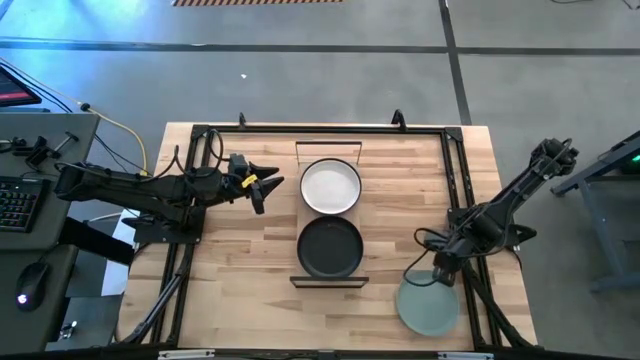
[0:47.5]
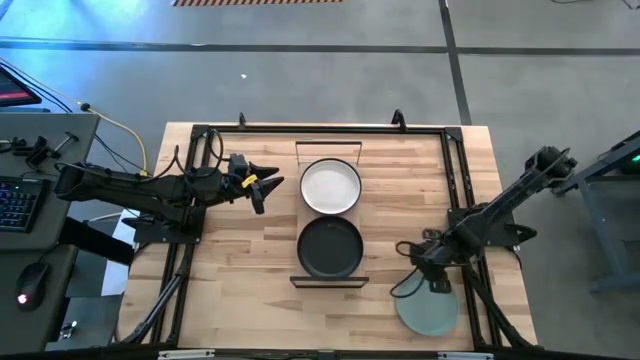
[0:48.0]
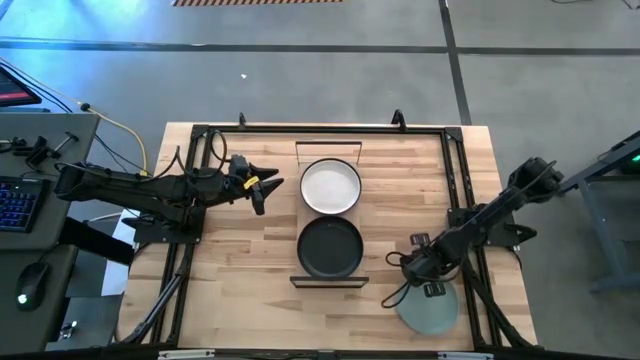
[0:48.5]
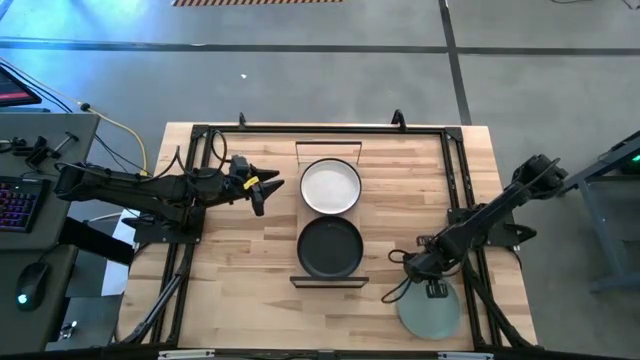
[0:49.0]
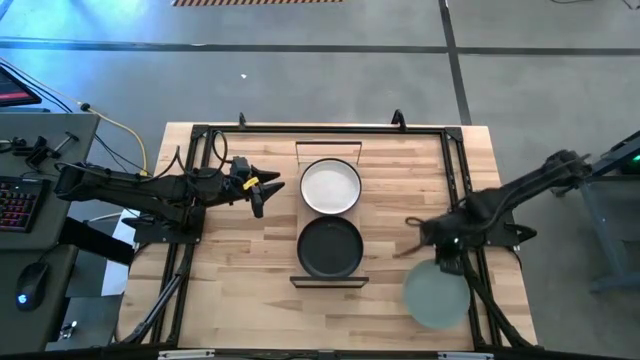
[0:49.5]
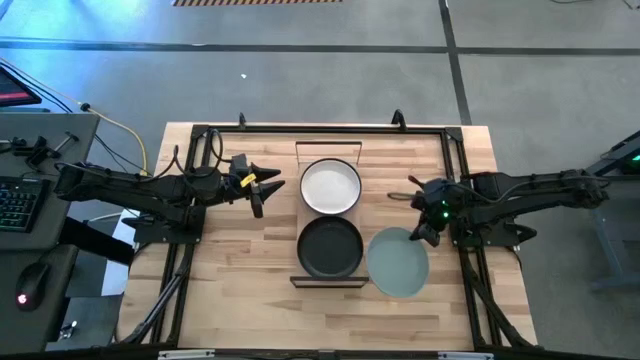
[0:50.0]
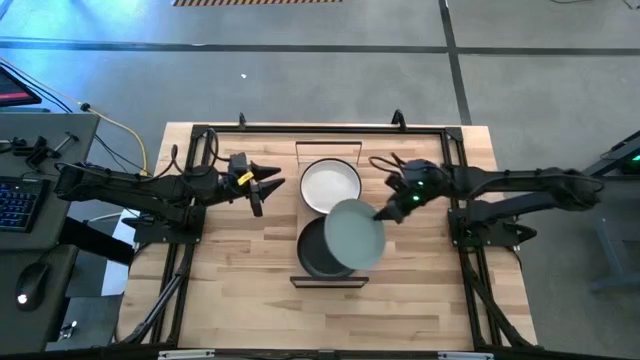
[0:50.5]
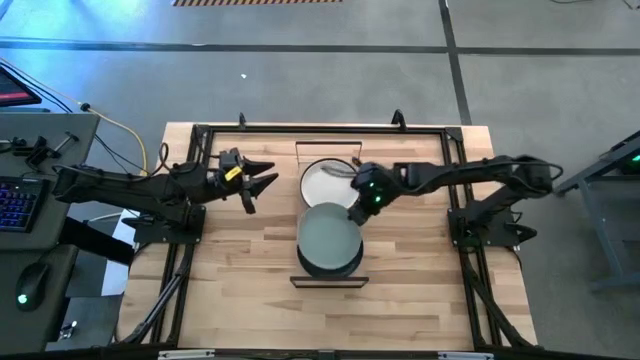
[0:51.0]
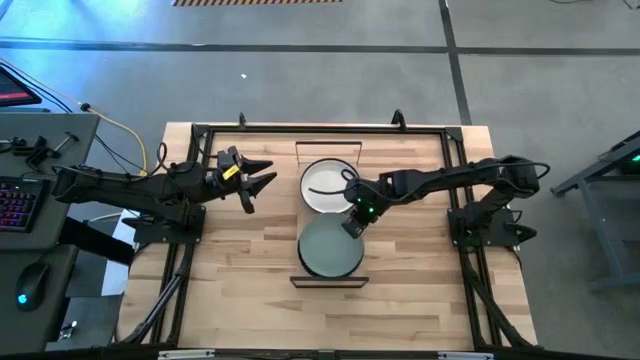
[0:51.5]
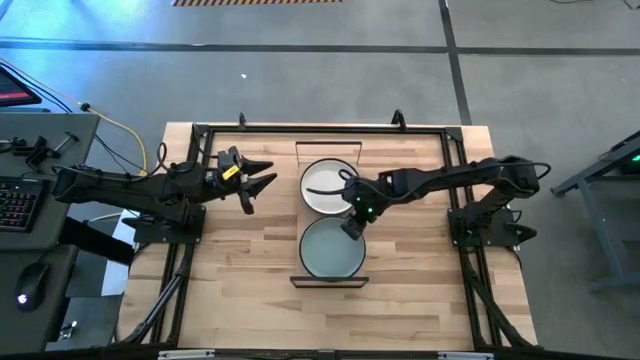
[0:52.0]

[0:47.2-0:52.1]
Task: Place and stack plates onto a shelf
Stack the light blue plate on top of the black plate on the shelf

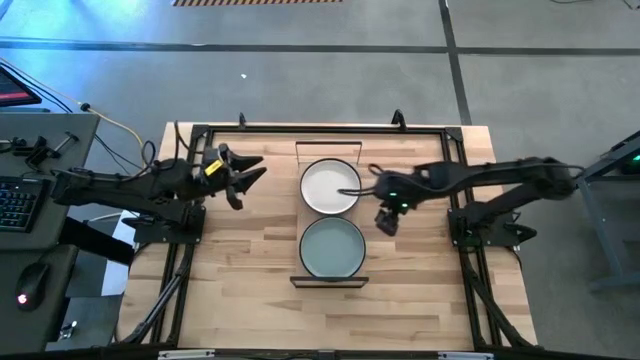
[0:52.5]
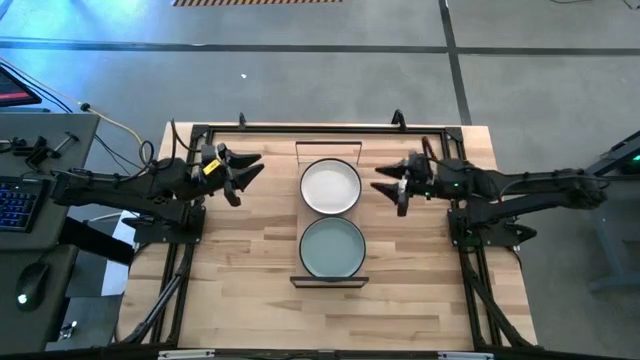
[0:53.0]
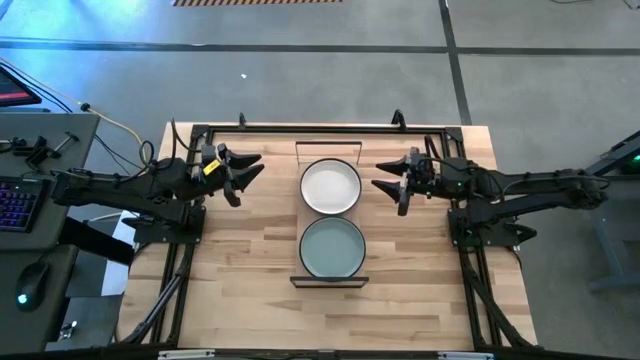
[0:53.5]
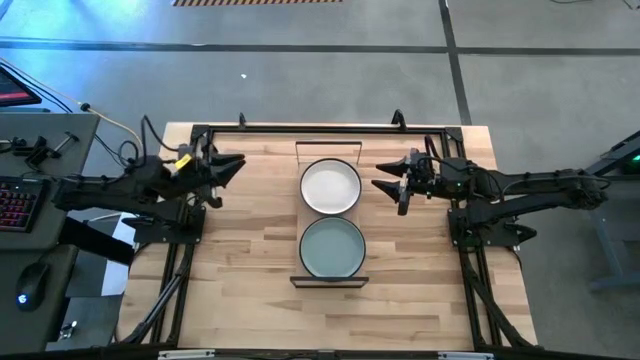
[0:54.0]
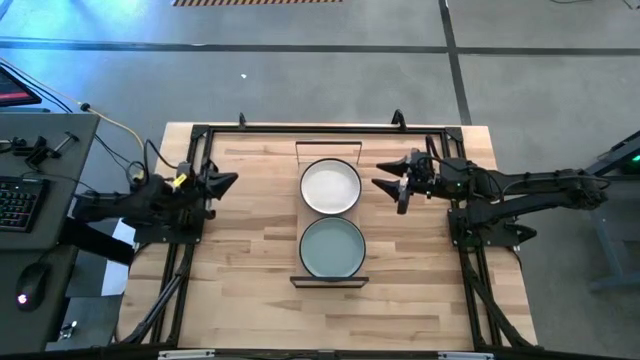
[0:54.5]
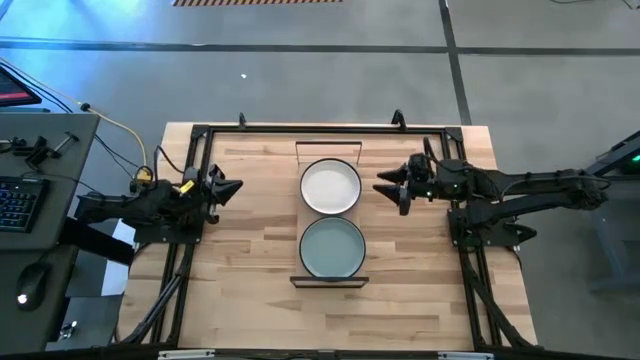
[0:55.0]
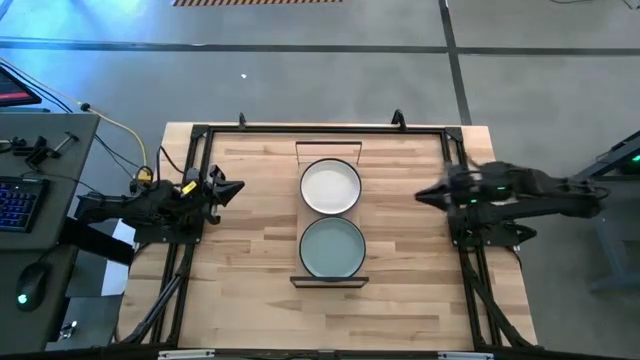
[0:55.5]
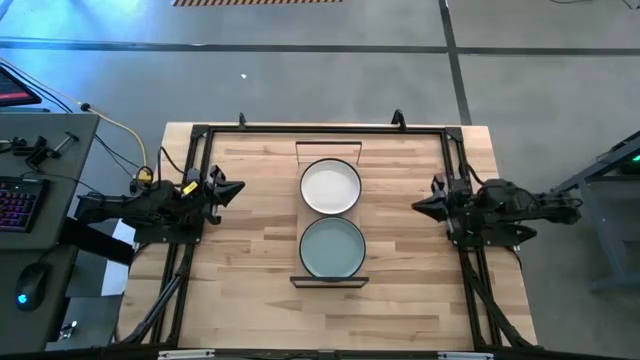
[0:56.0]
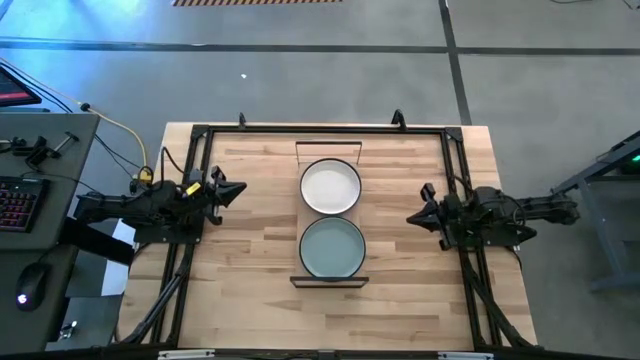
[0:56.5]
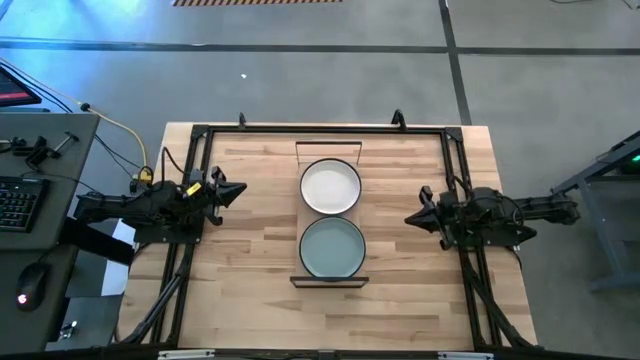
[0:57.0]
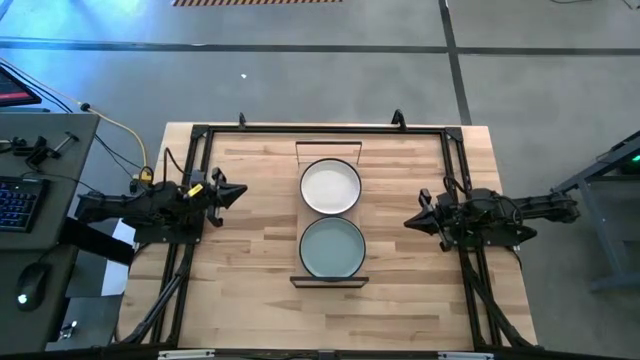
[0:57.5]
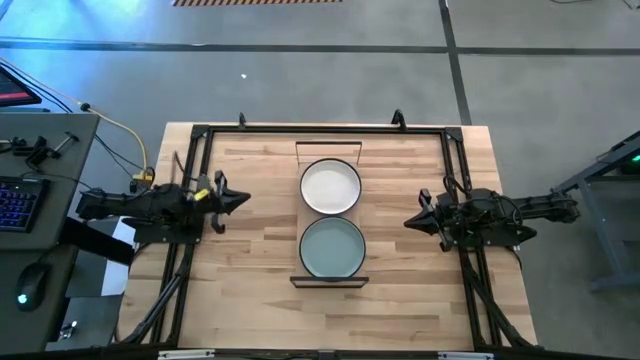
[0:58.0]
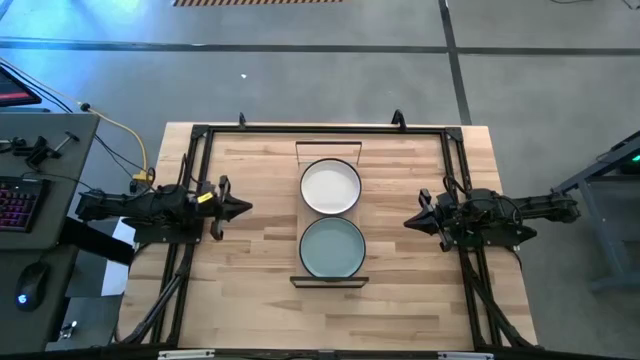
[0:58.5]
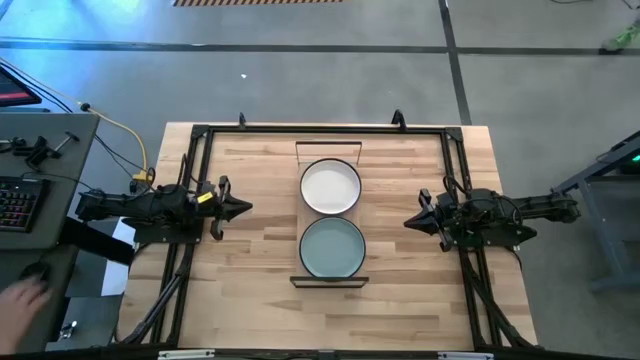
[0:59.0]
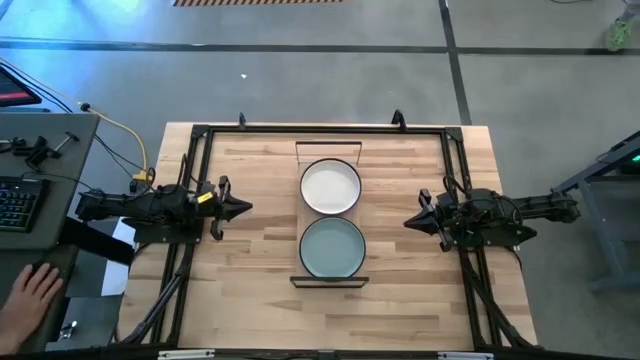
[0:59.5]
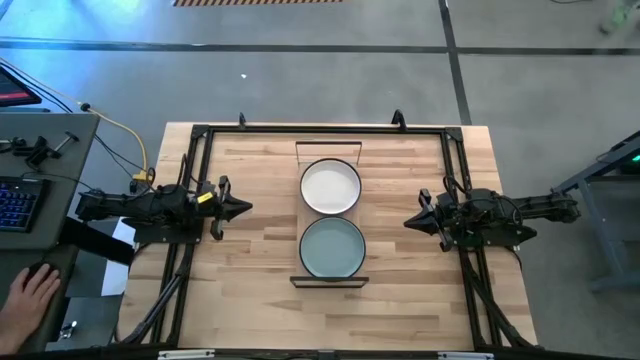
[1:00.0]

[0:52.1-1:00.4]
Return to Home Position

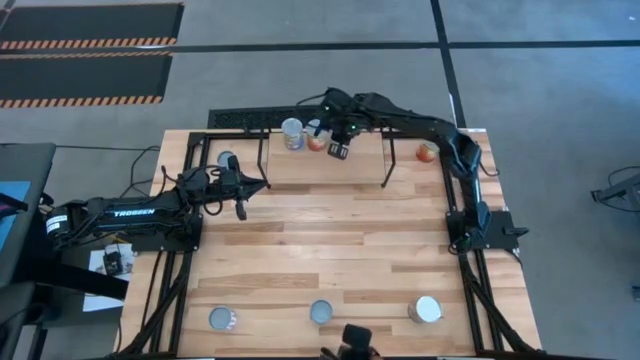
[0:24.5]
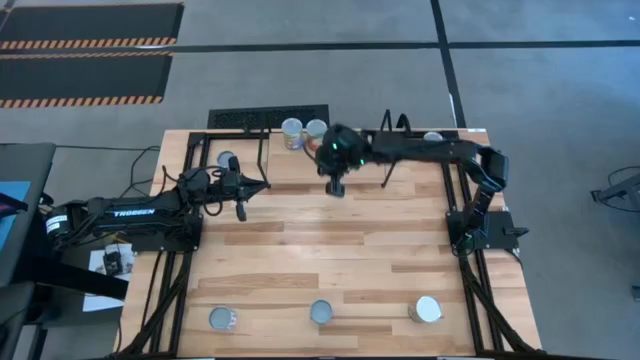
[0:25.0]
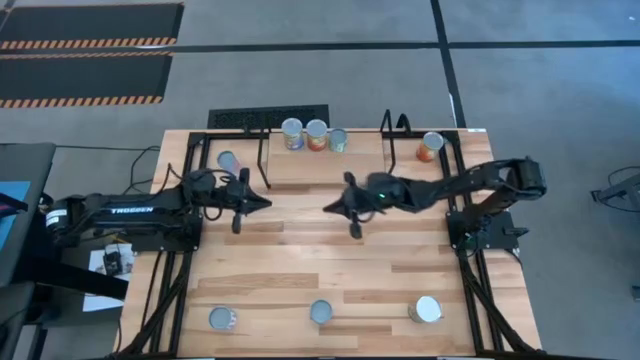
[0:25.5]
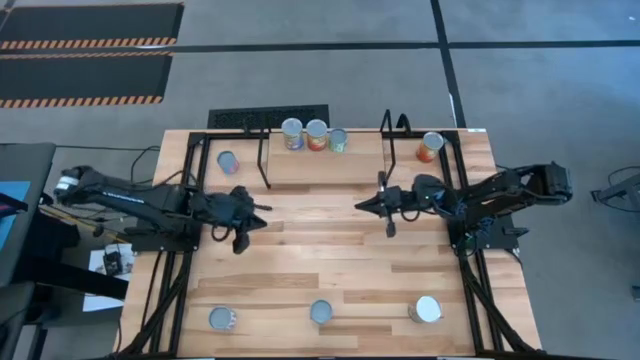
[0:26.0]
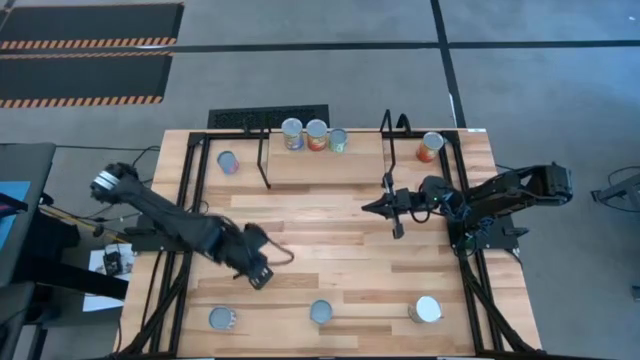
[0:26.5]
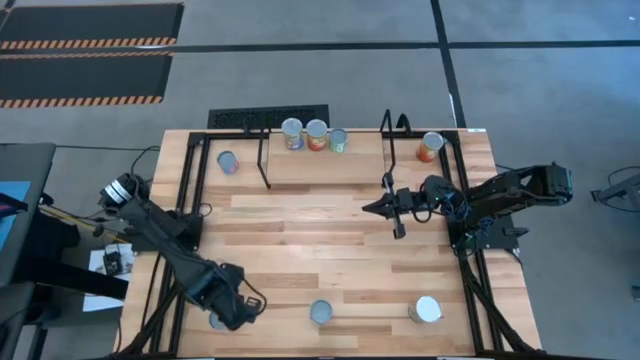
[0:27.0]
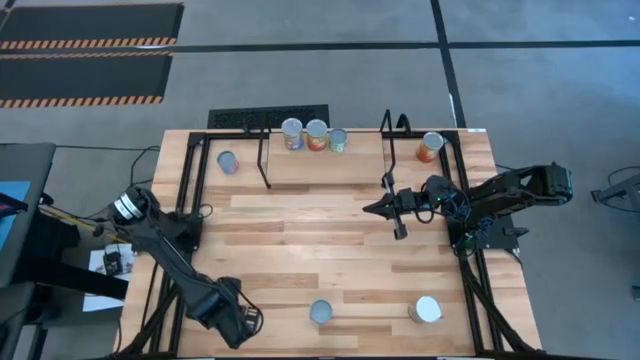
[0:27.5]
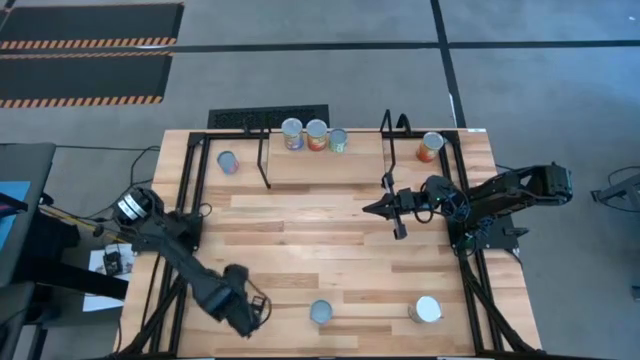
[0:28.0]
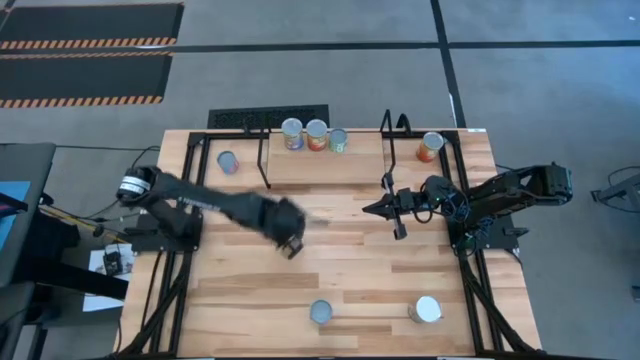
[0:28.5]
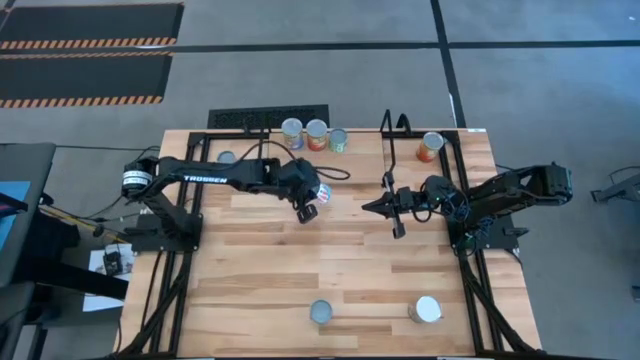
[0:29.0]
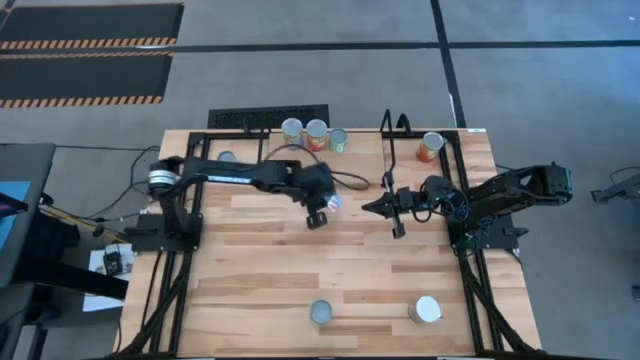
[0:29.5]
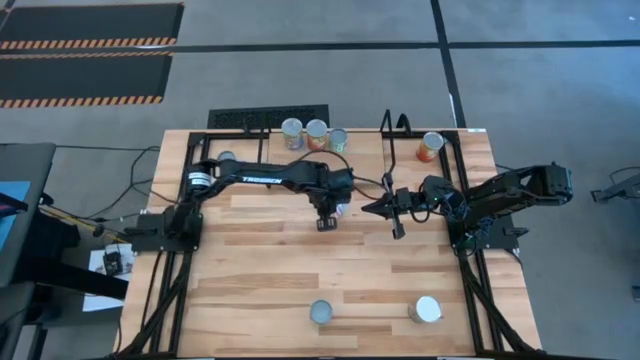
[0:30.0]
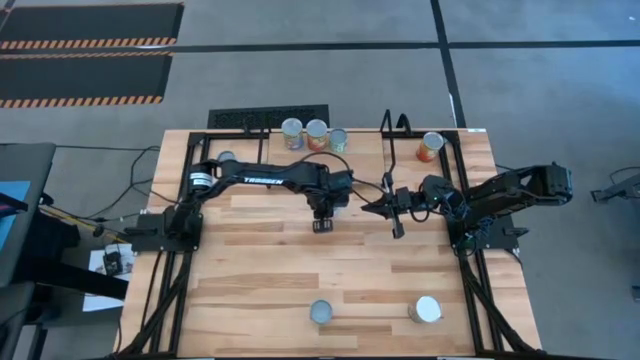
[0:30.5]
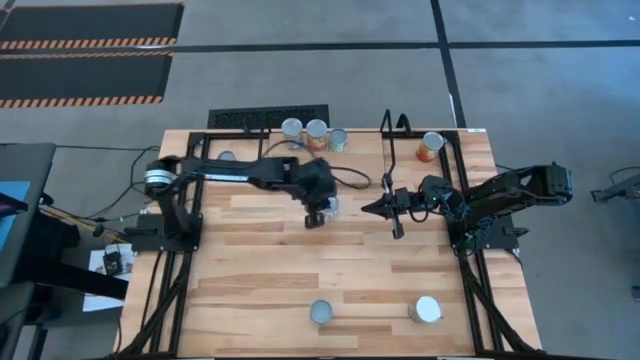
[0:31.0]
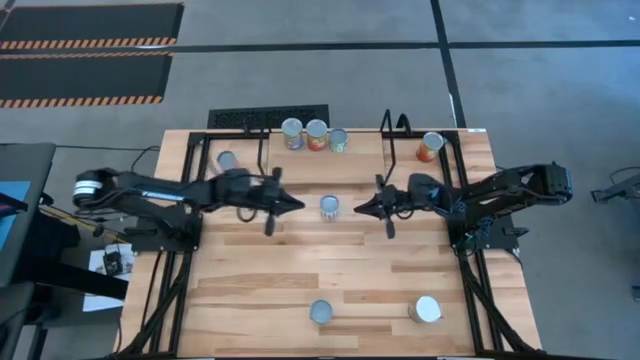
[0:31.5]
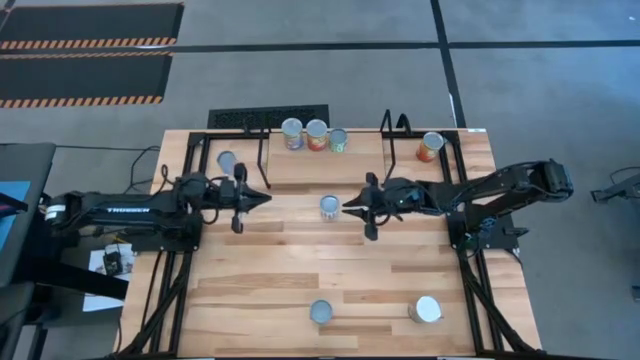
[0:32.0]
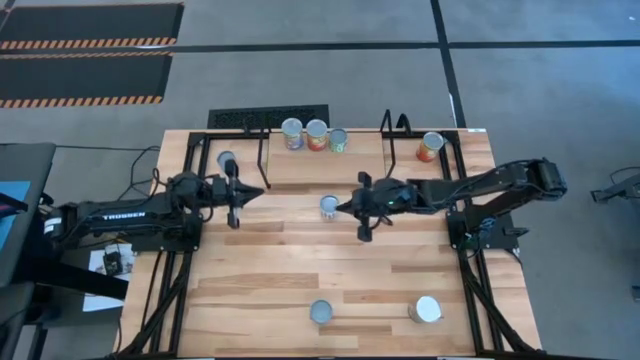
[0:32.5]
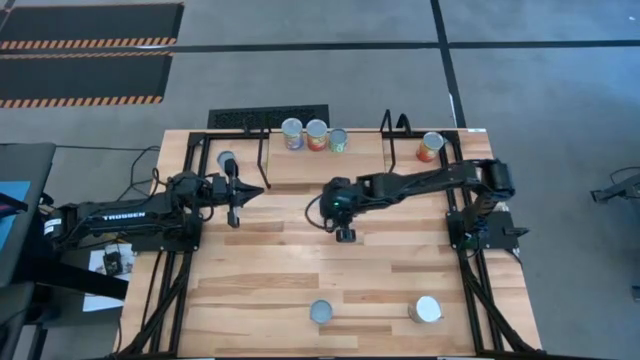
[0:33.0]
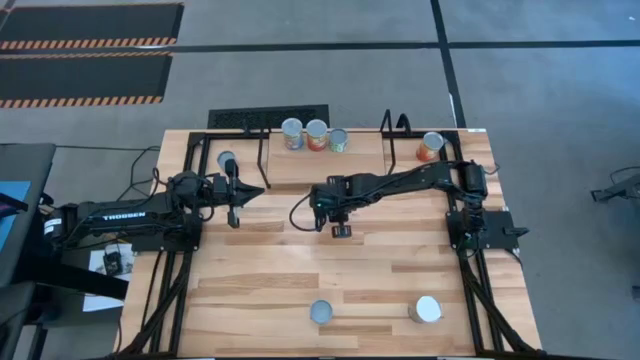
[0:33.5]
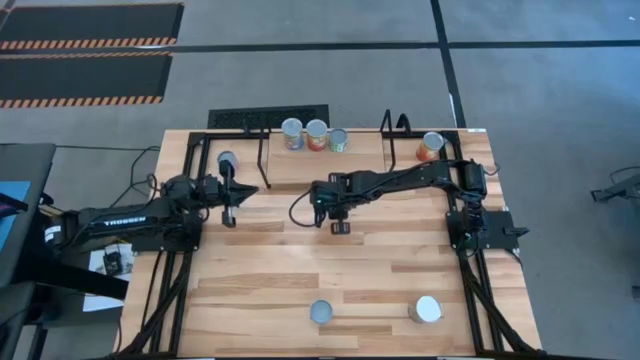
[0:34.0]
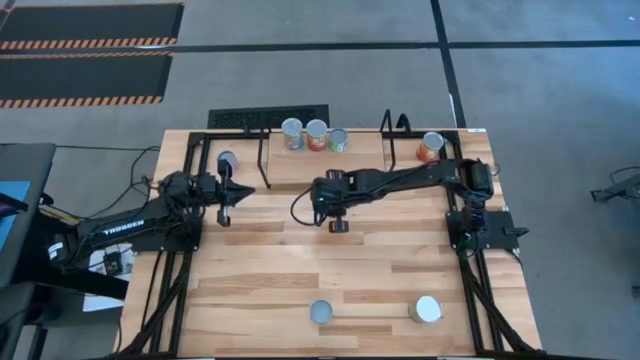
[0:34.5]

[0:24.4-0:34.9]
Task: Pick and place cans onto a shelf
Put the canned carrots on the shelf
